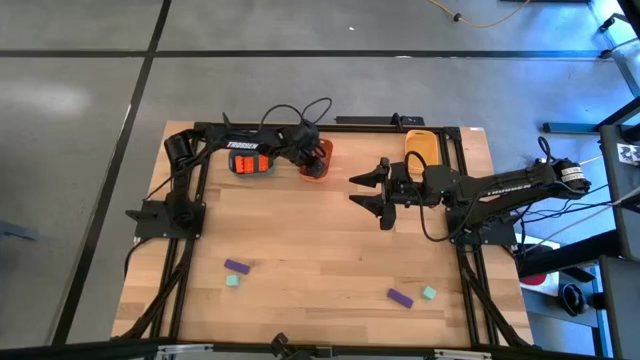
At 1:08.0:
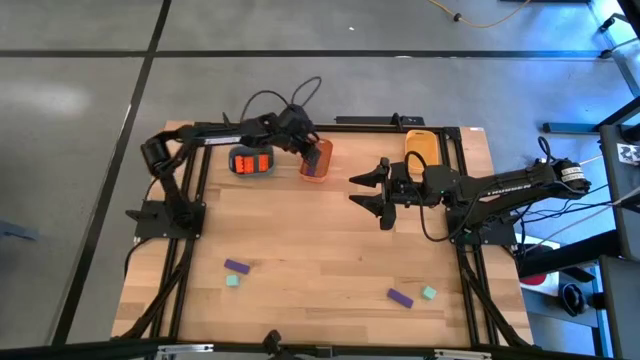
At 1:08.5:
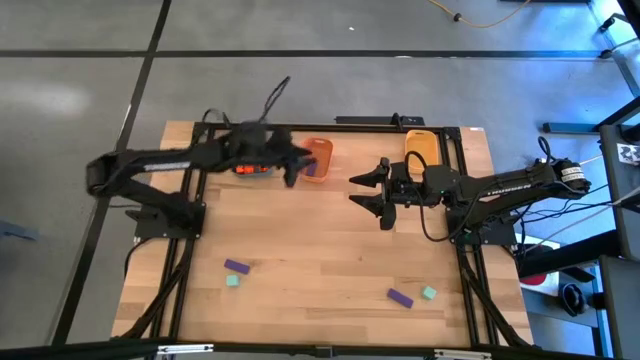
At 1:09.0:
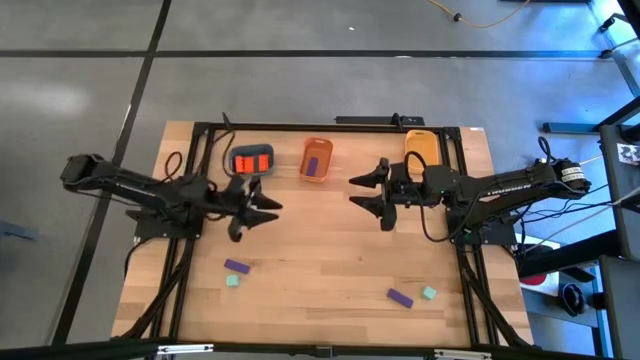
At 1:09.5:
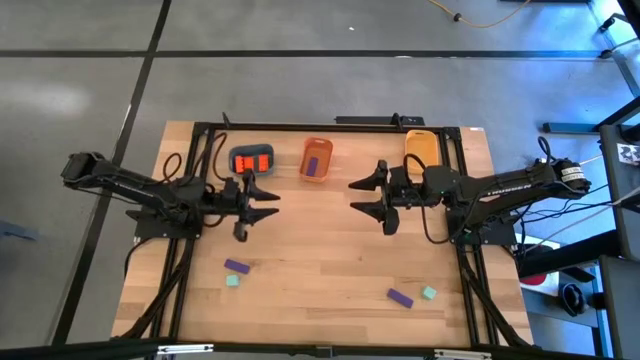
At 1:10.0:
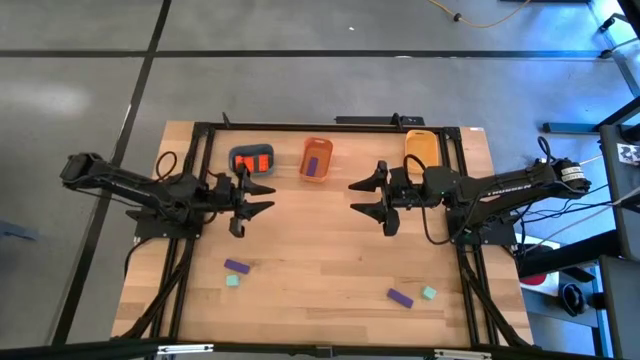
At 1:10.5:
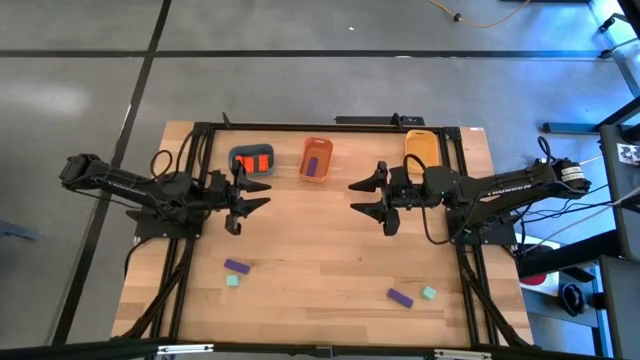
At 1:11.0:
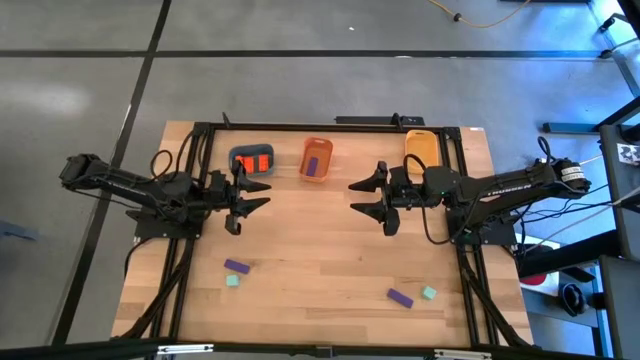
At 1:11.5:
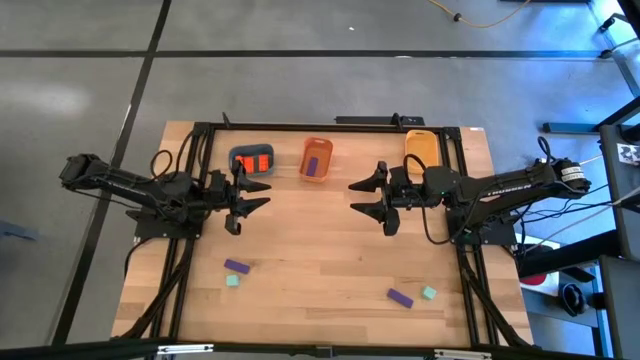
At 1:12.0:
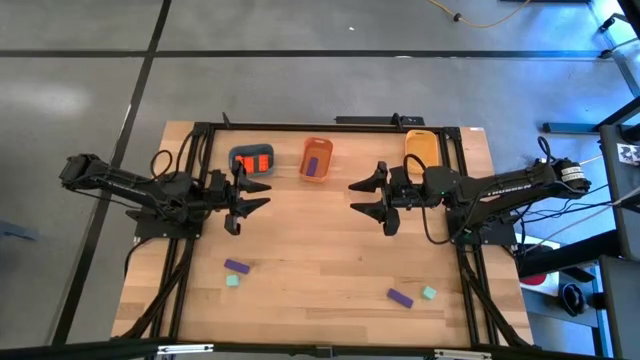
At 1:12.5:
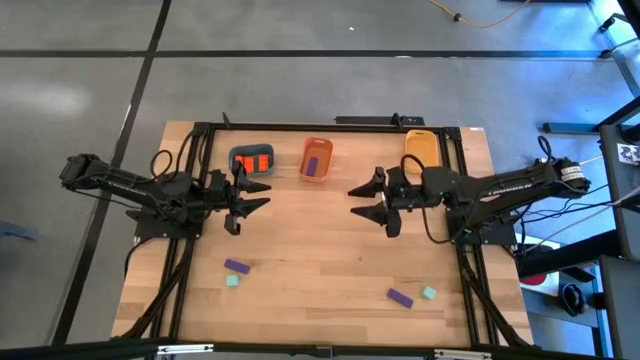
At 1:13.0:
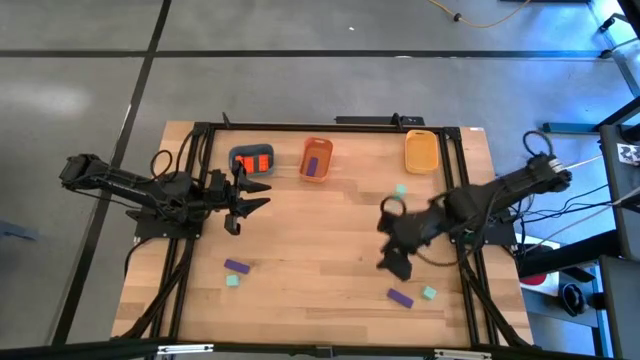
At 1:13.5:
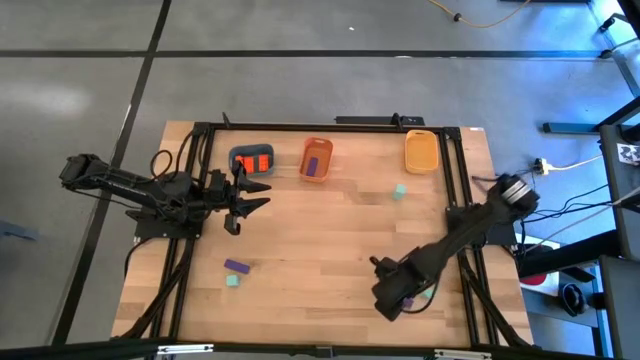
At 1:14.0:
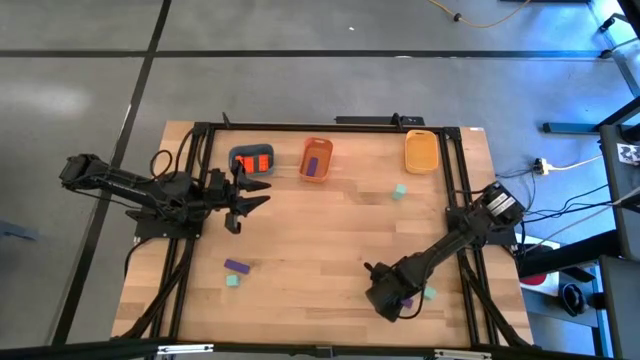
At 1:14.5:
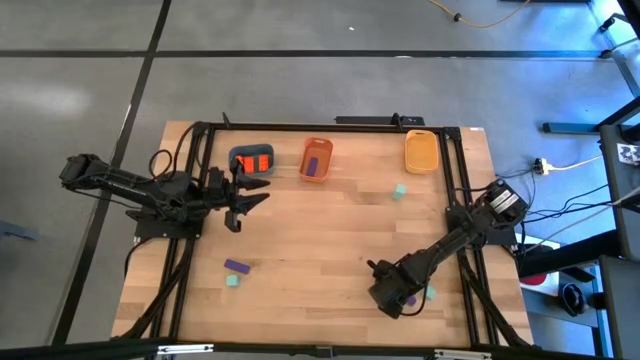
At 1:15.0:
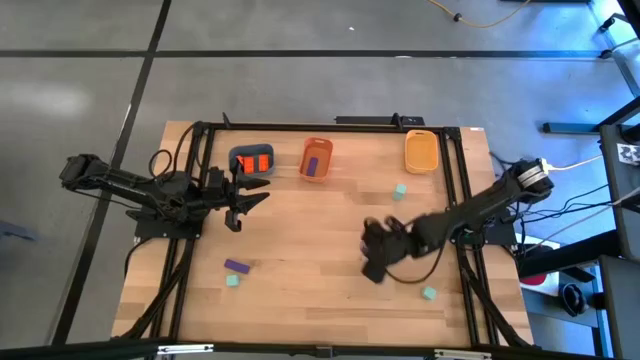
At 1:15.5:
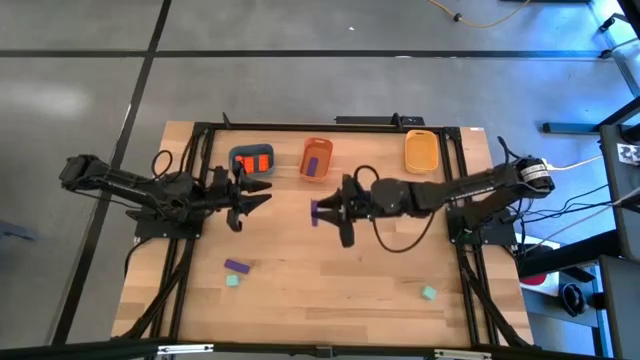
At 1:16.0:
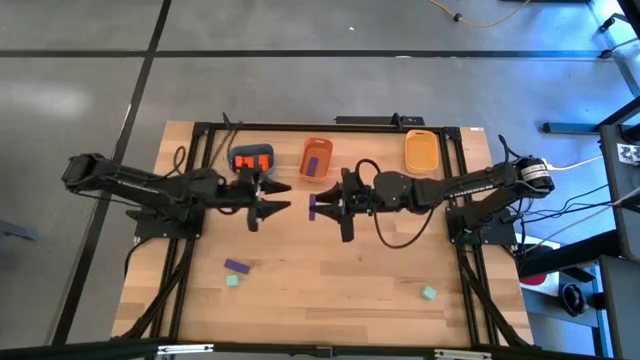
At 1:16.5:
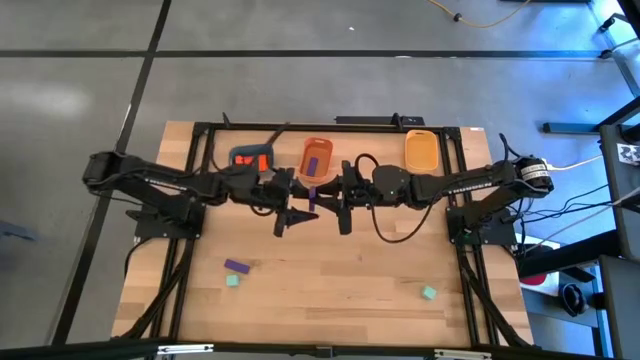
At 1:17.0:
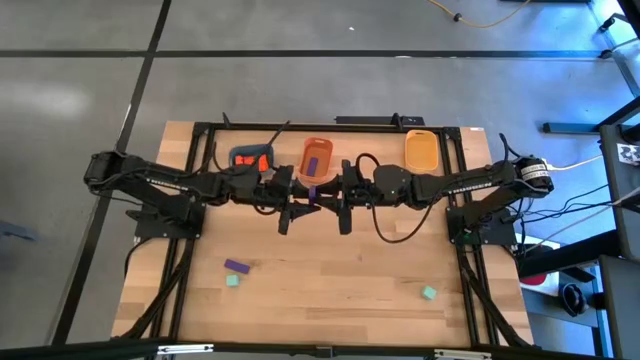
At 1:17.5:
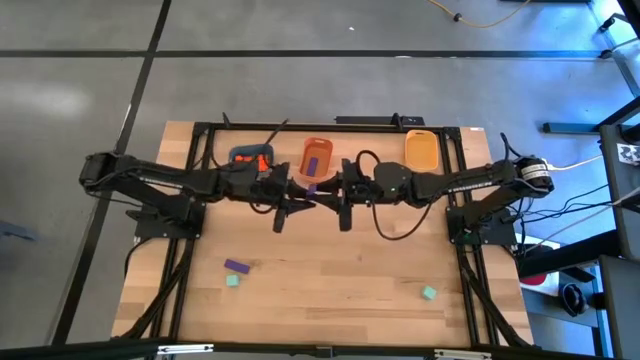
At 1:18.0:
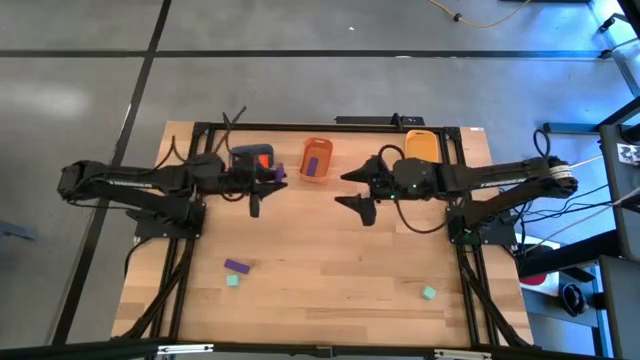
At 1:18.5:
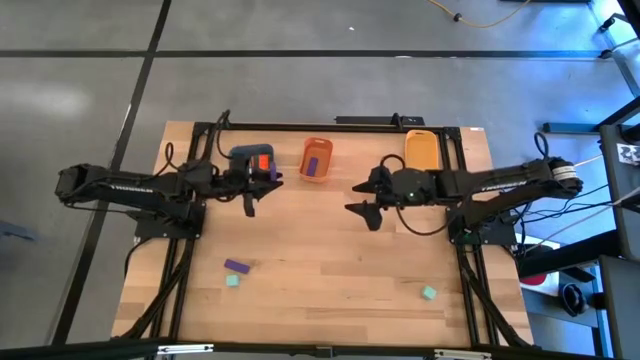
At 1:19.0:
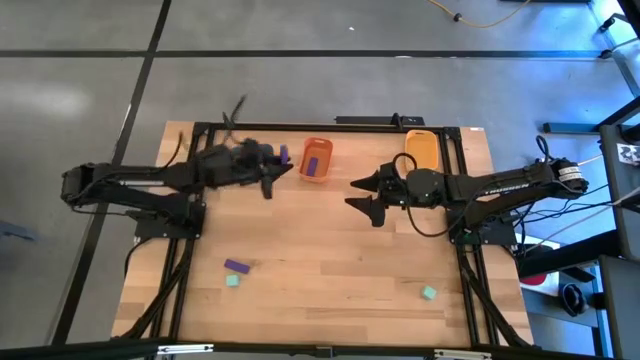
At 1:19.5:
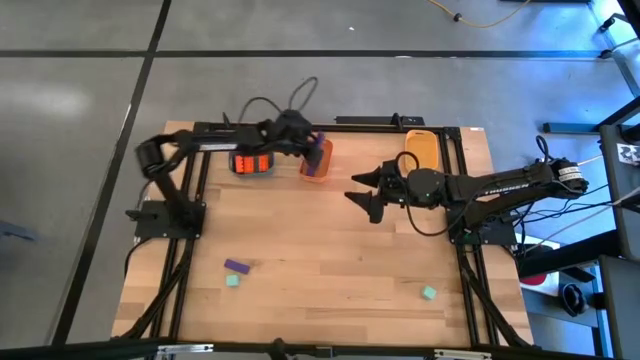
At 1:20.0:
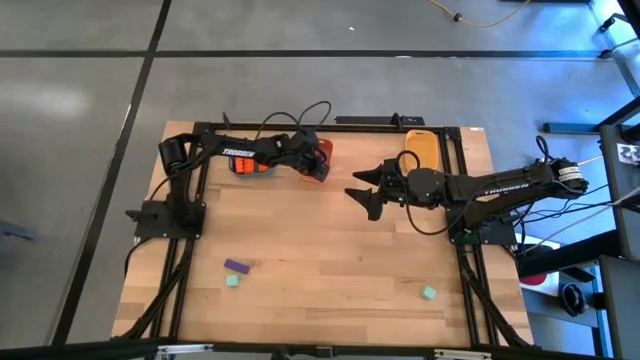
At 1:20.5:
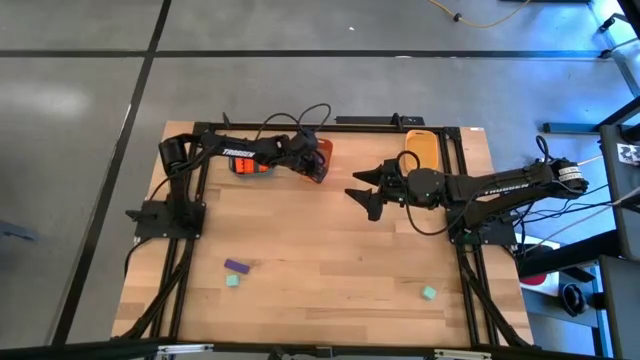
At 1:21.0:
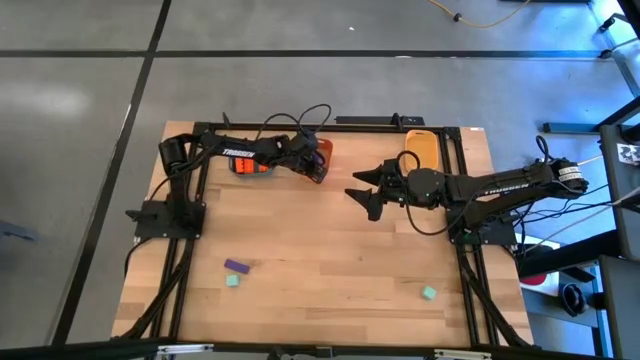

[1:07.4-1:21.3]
Task: Sort & place blocks by color
Put the right violet block into the orange bin

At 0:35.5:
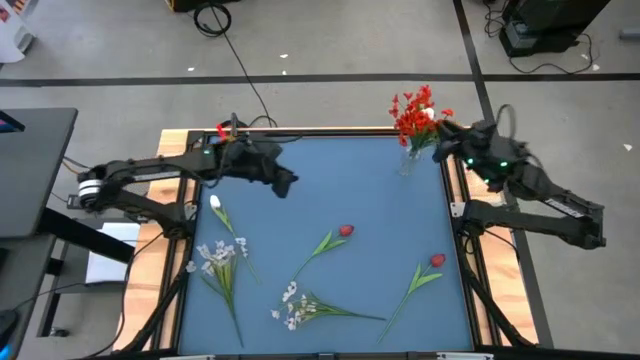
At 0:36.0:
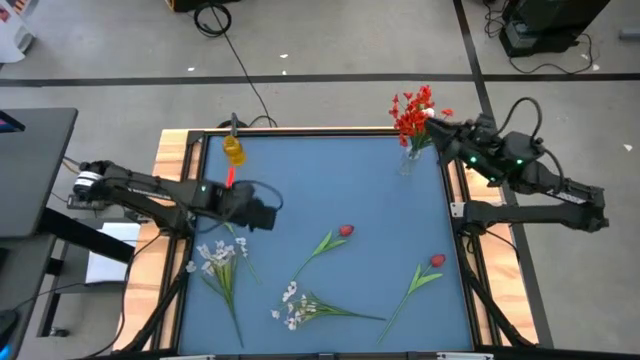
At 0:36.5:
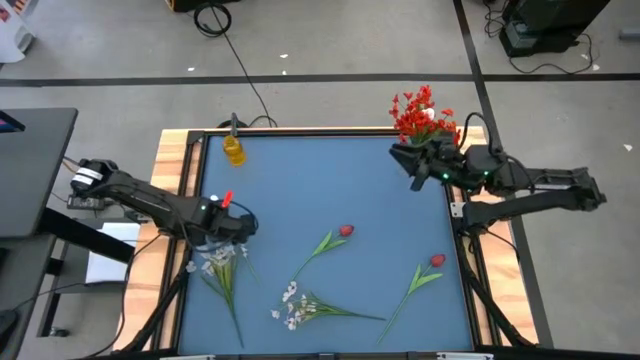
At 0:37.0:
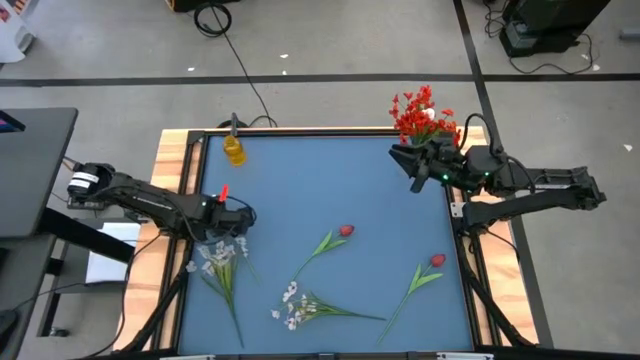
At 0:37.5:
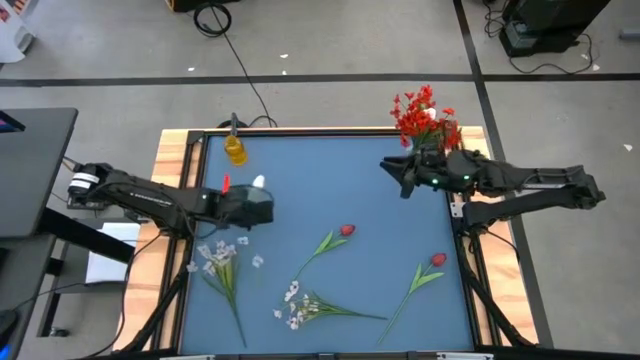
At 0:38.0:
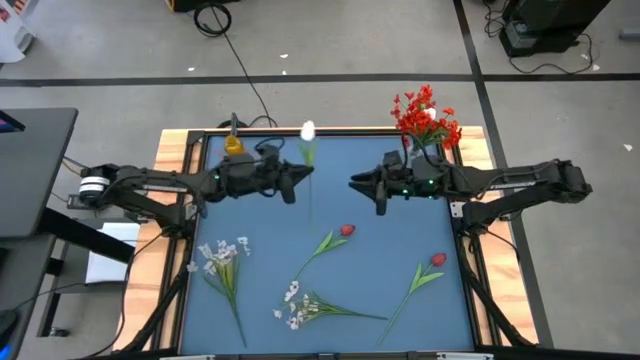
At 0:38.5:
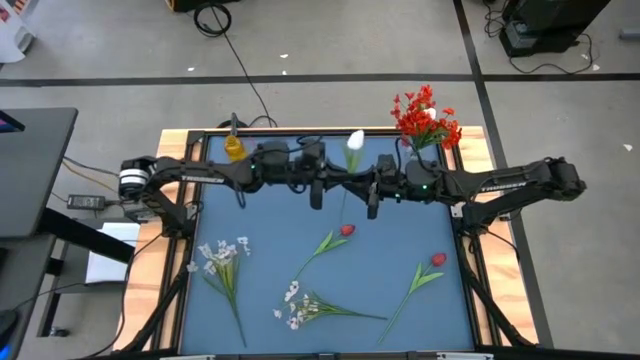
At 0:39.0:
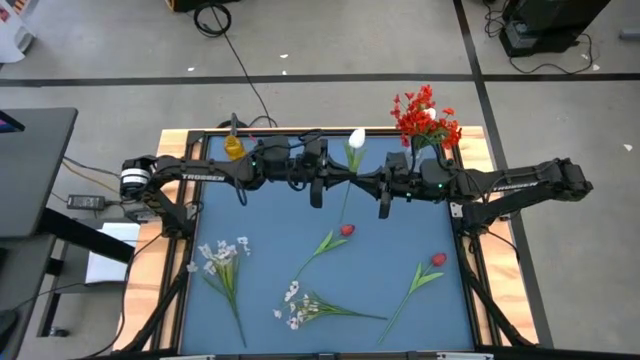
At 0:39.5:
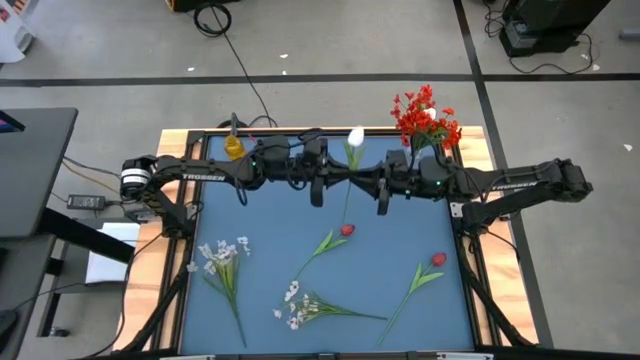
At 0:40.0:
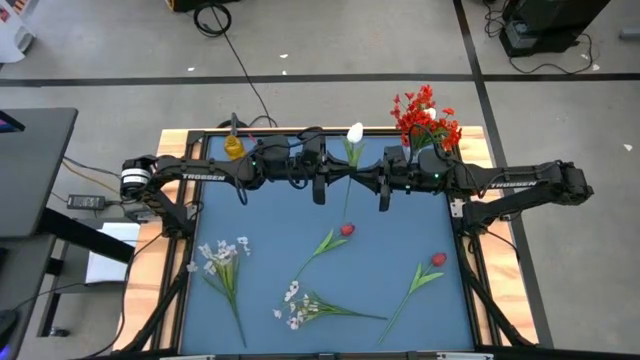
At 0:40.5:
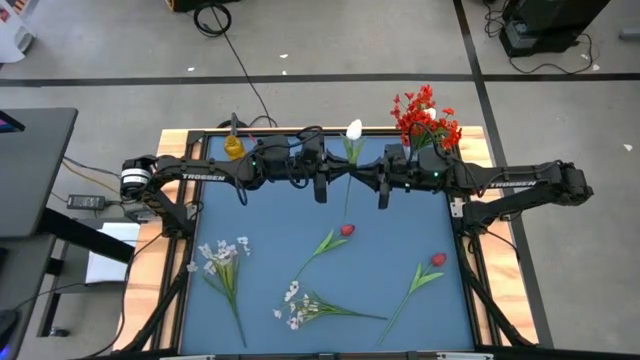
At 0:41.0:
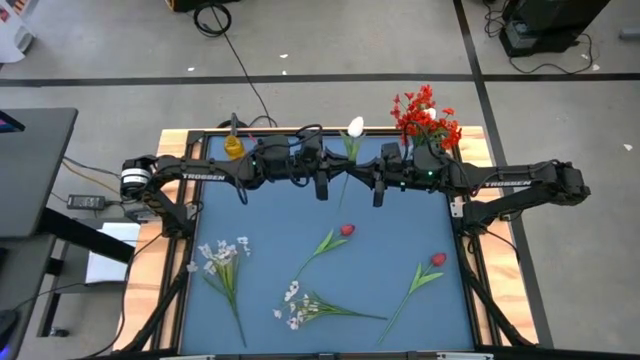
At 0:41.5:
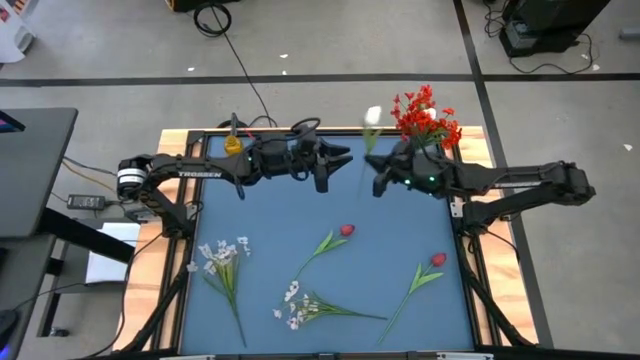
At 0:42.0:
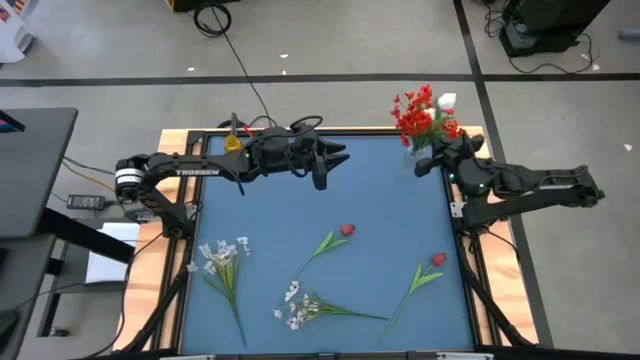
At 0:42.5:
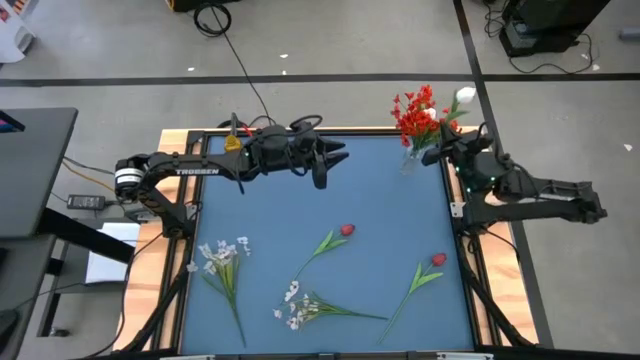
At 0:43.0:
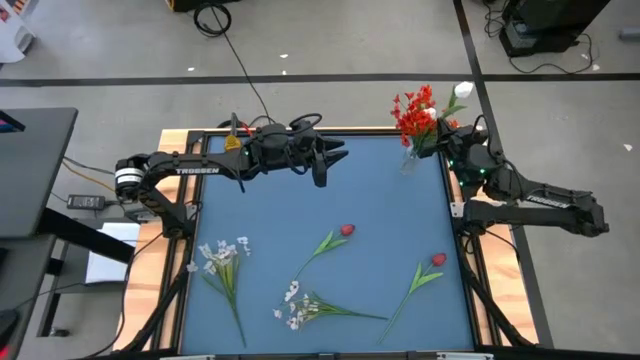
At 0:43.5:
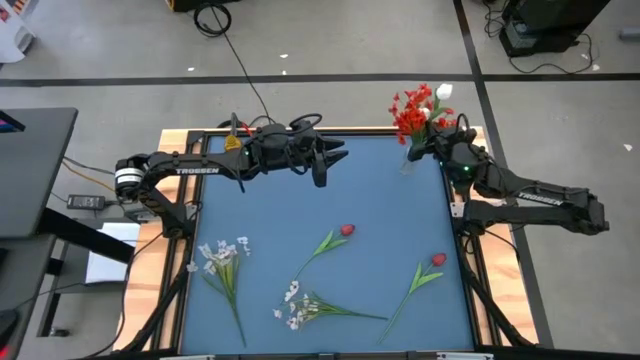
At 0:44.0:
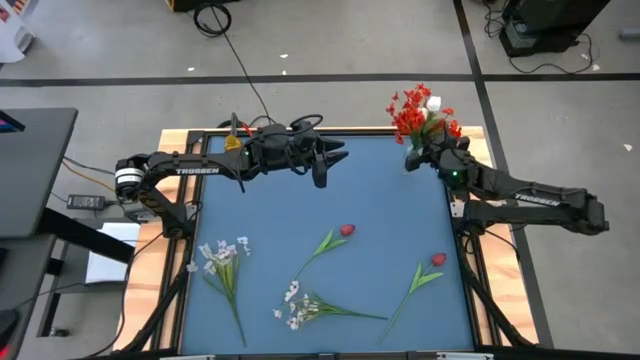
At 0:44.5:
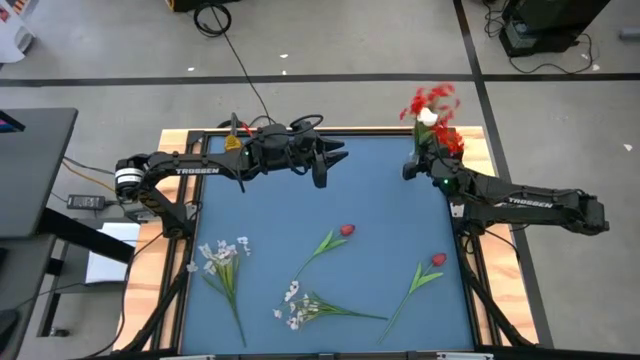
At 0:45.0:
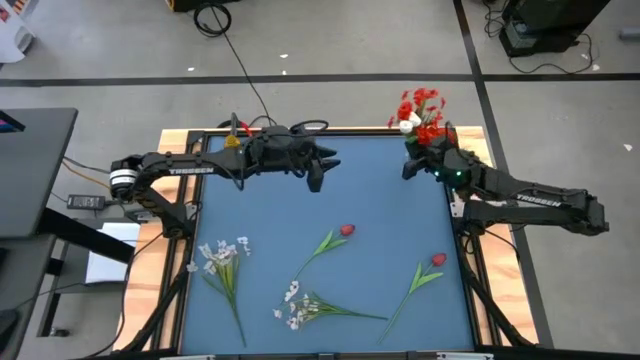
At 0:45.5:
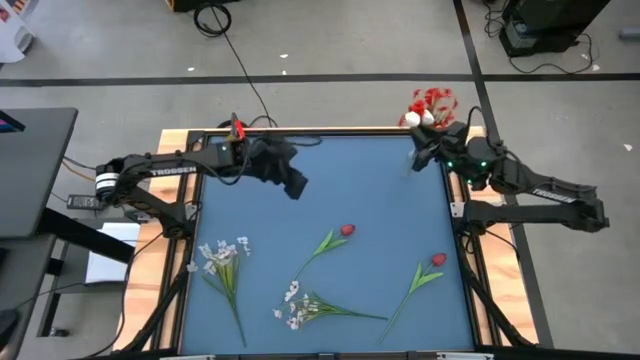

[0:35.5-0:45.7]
Task: Sort flowers into vase by color
Put the white tulip into the transparent vase
